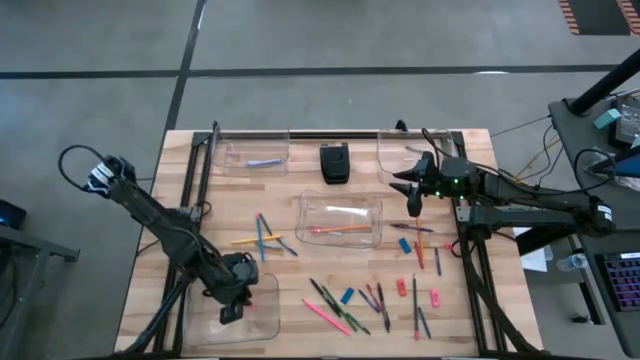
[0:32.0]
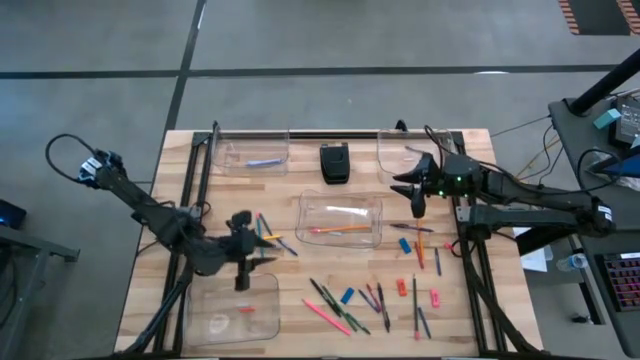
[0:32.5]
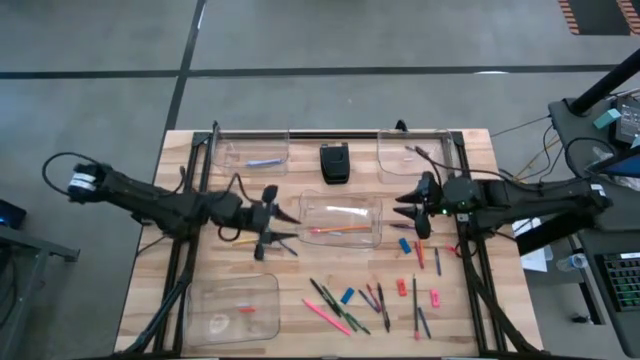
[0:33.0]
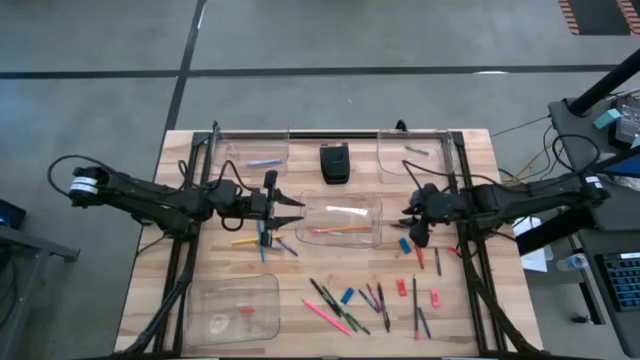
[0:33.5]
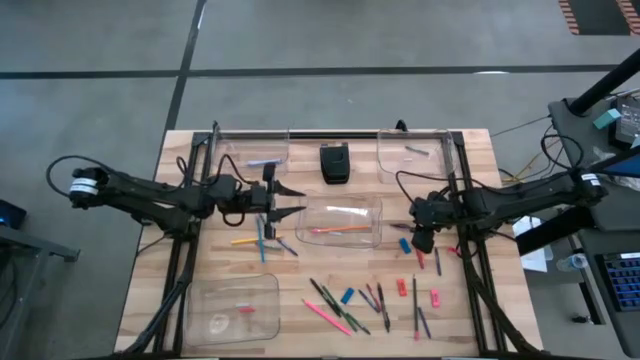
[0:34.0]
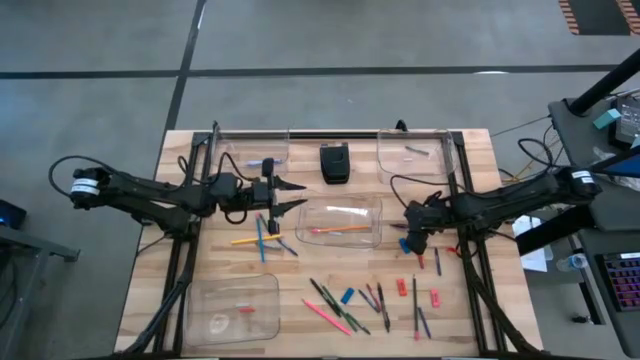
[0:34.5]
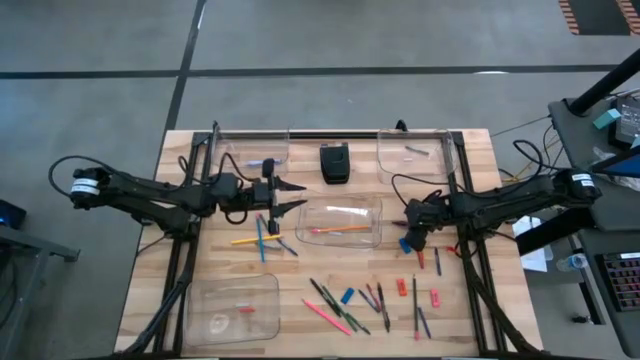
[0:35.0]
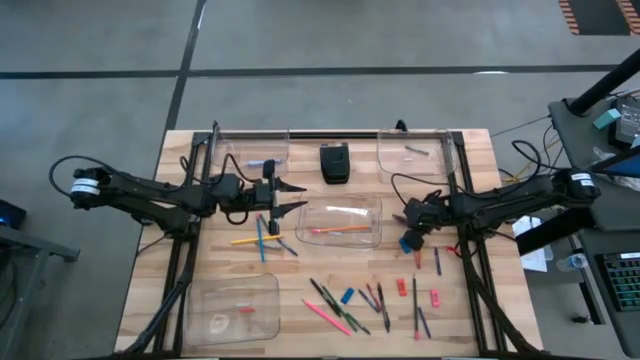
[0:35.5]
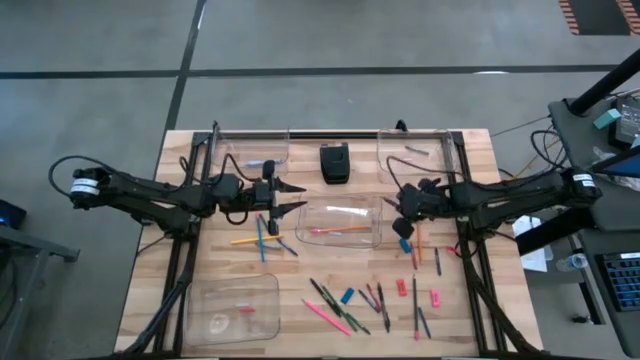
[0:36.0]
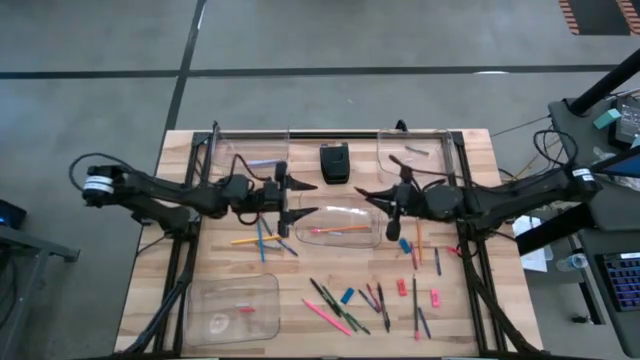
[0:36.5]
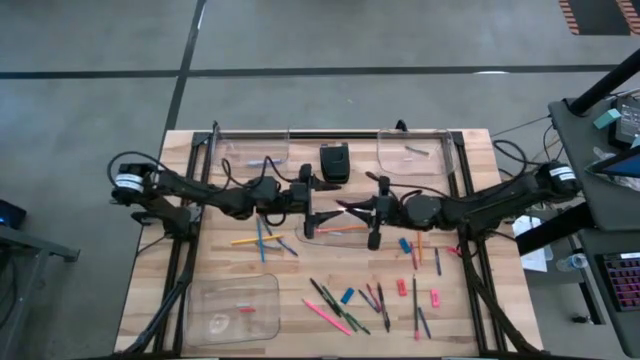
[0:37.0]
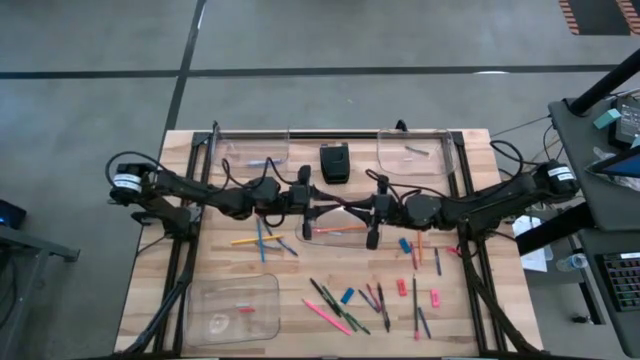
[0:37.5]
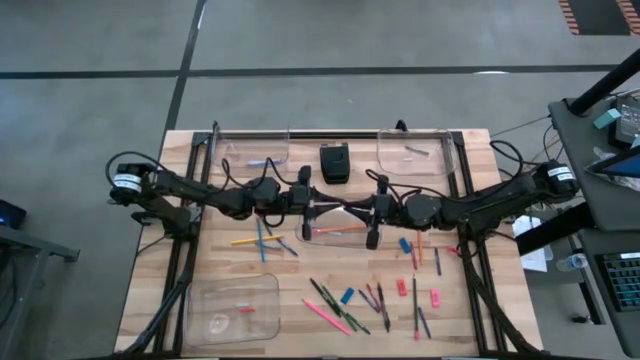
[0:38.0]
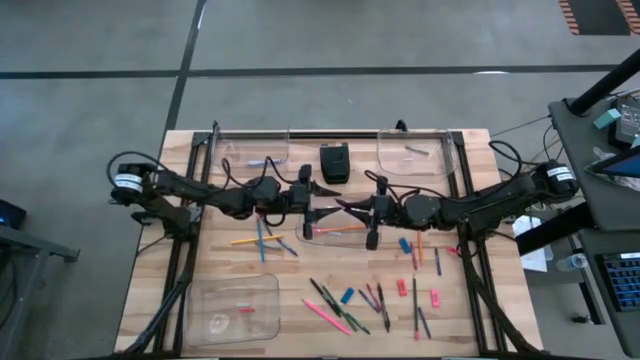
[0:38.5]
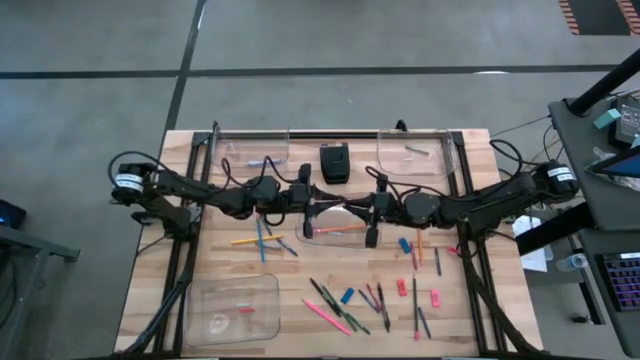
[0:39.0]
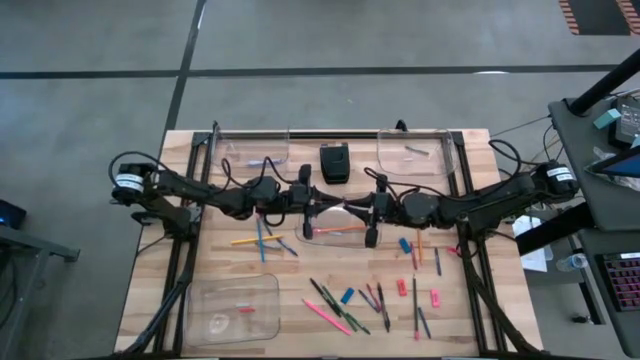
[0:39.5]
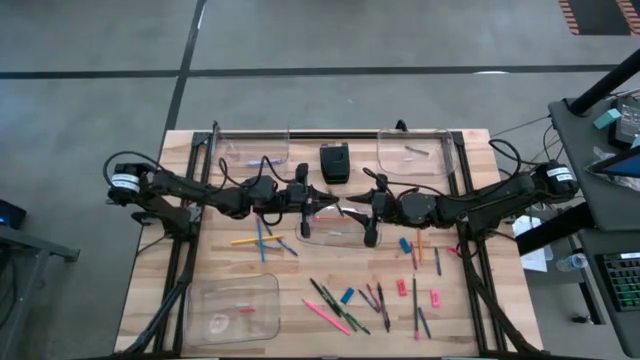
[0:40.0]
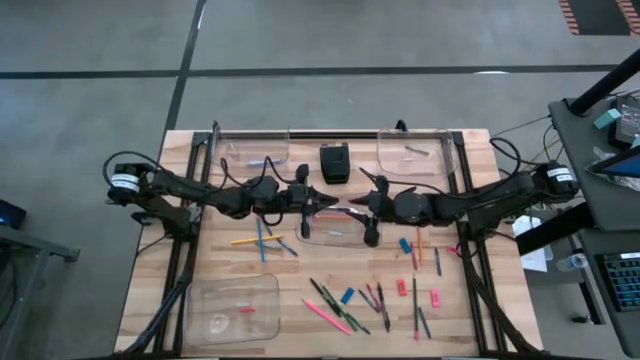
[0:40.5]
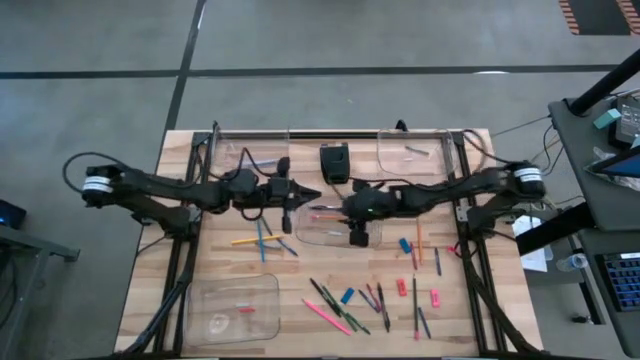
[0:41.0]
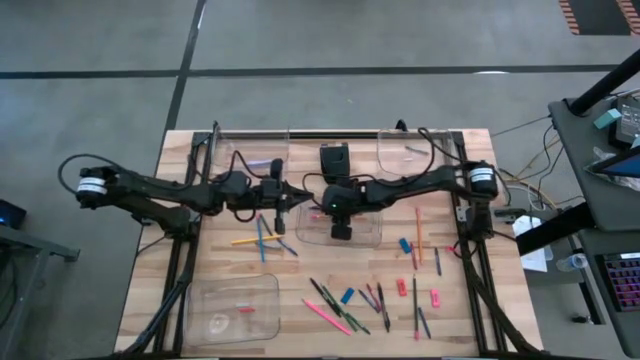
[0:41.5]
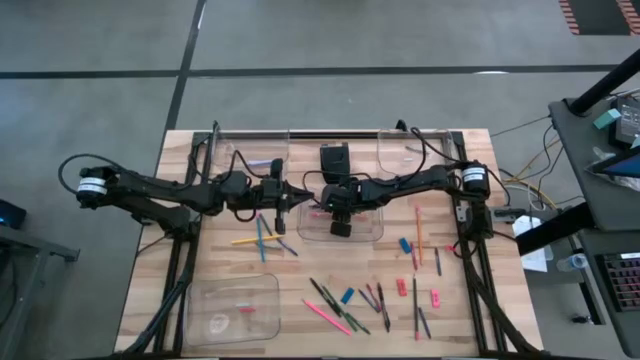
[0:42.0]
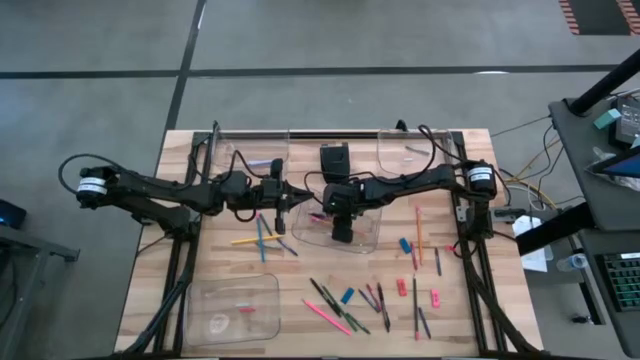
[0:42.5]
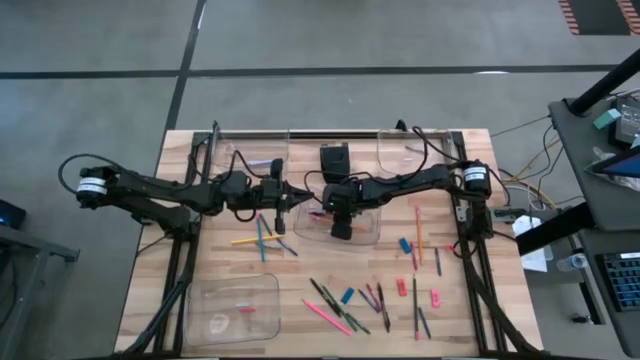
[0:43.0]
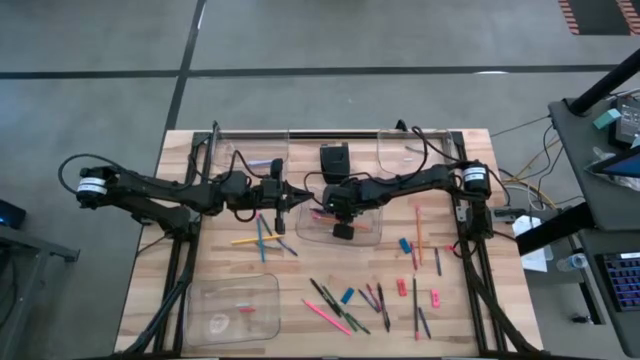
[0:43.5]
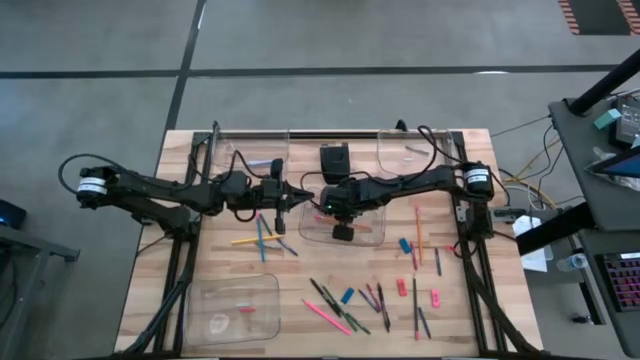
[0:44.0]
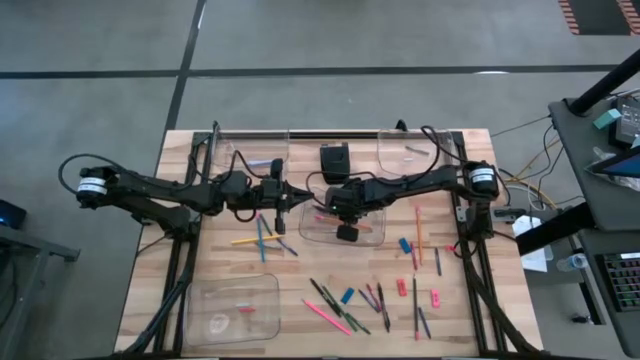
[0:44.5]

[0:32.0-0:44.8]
Task: Sort crayons/erasers/pens/pencils in bins
Put the violet pen into the top left transparent bin

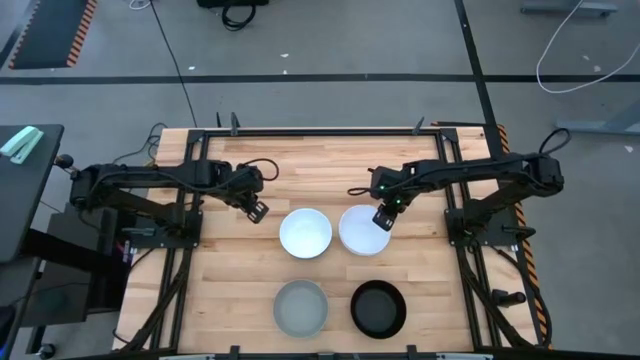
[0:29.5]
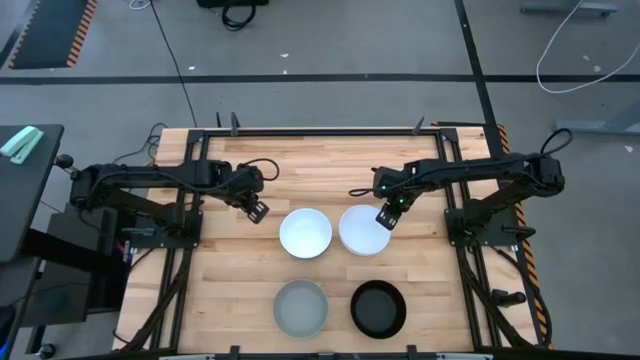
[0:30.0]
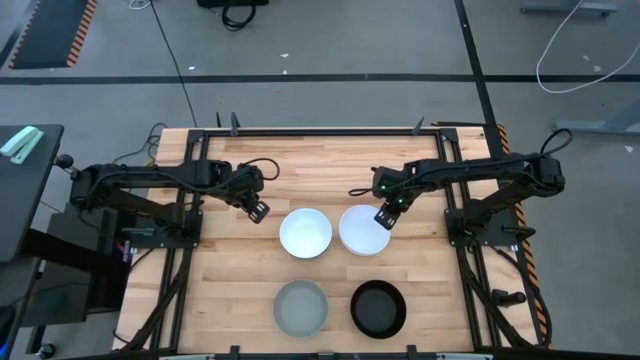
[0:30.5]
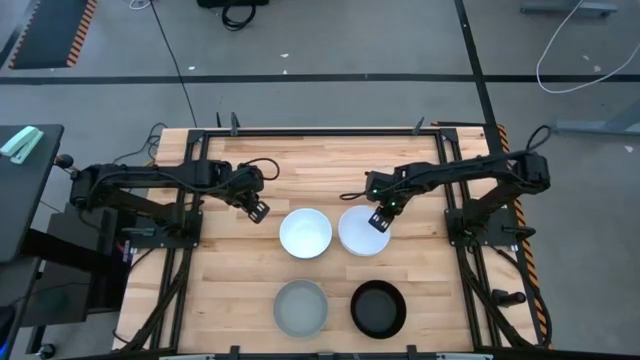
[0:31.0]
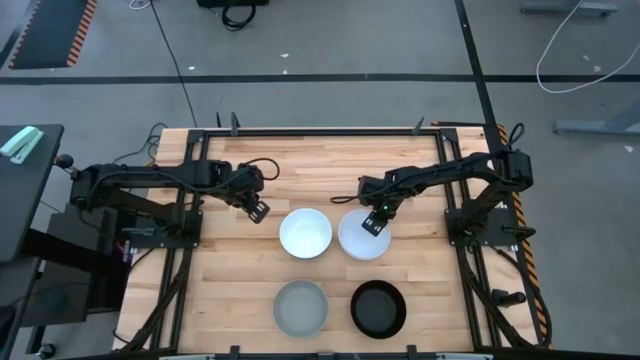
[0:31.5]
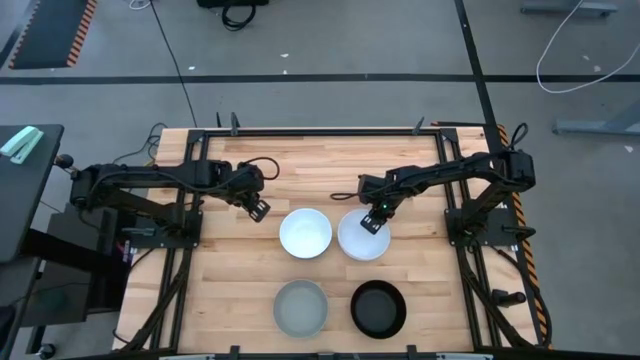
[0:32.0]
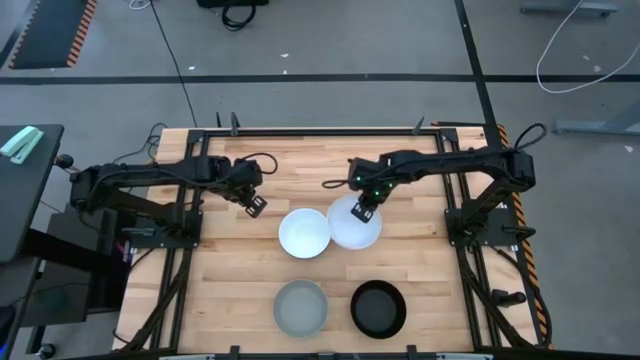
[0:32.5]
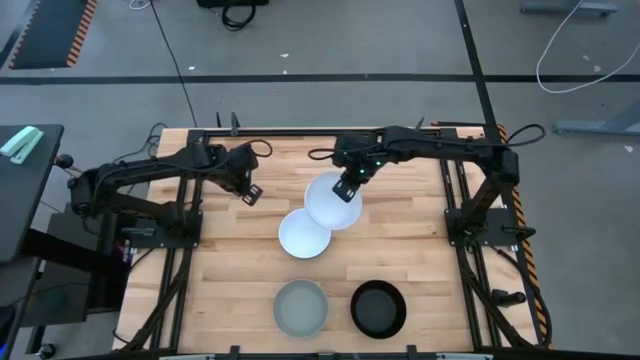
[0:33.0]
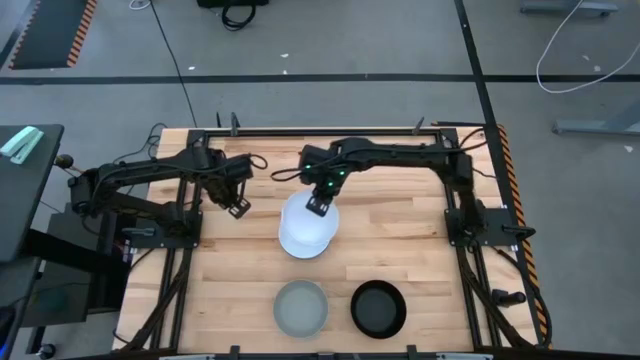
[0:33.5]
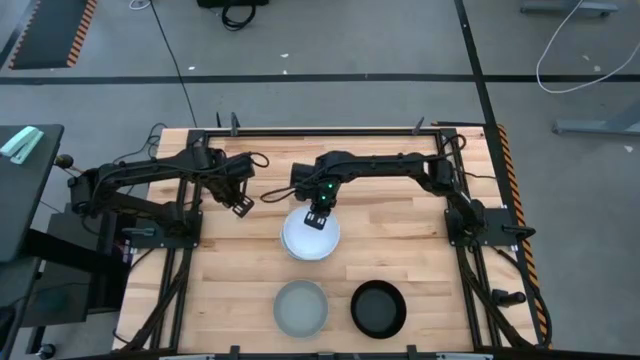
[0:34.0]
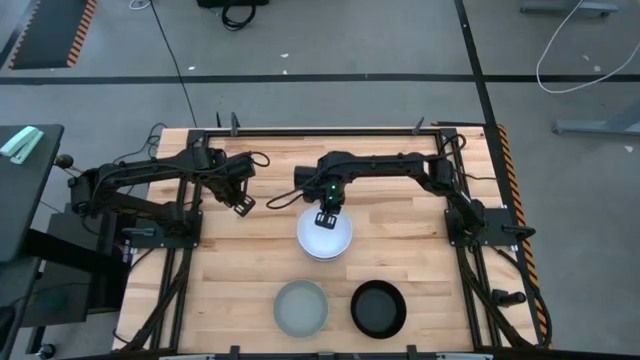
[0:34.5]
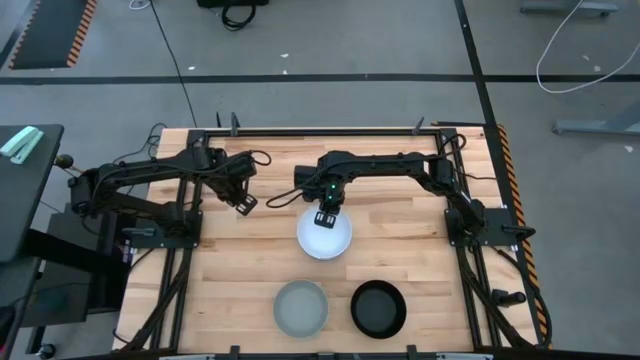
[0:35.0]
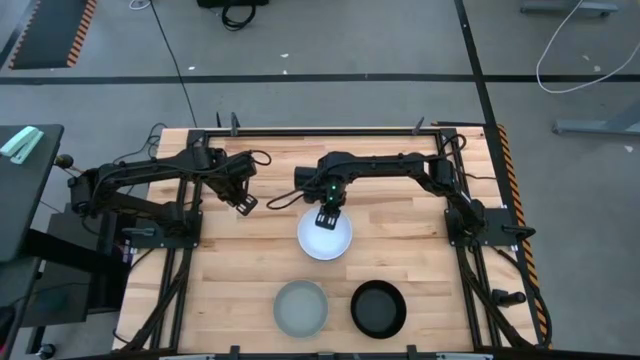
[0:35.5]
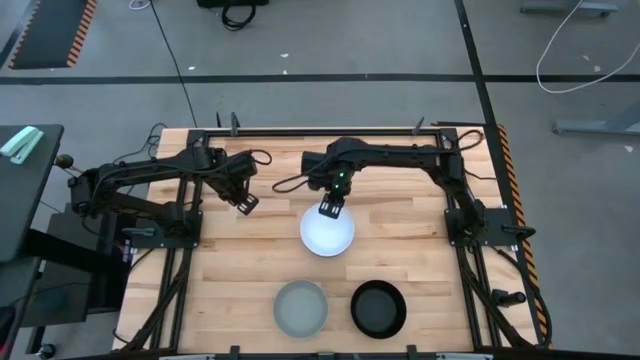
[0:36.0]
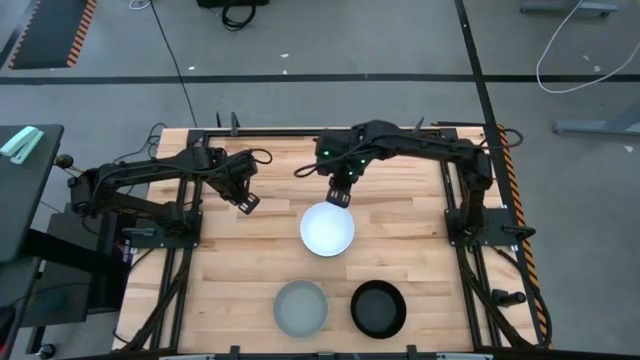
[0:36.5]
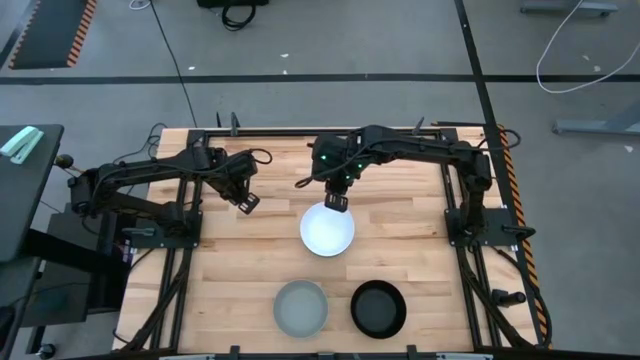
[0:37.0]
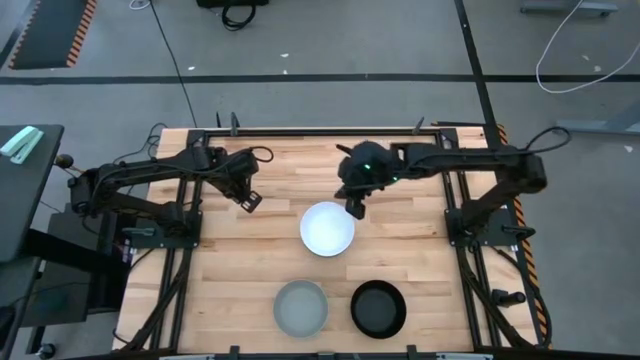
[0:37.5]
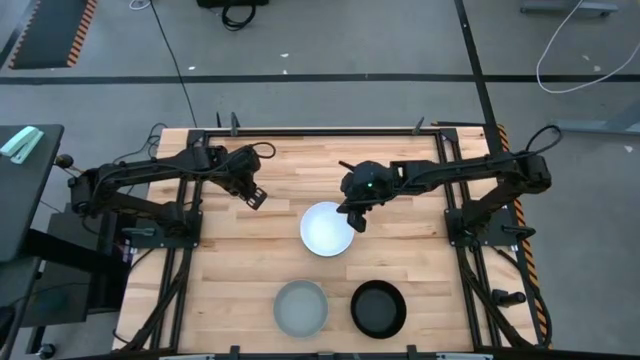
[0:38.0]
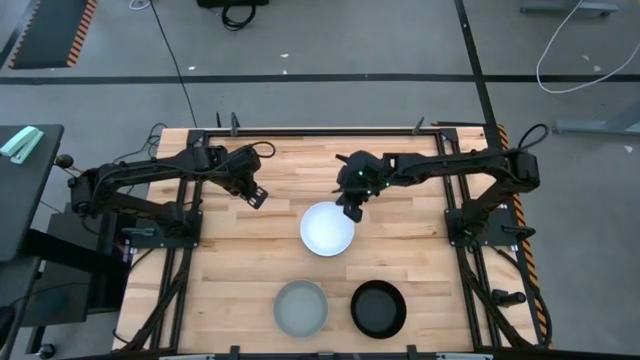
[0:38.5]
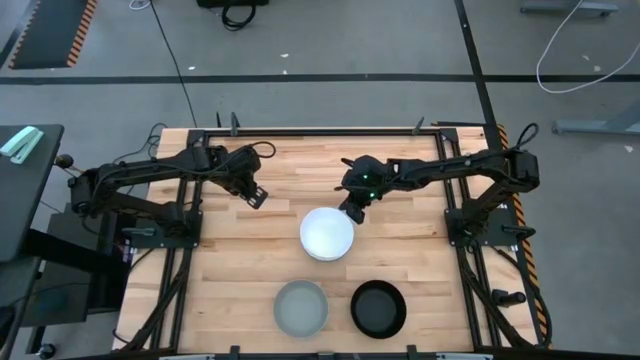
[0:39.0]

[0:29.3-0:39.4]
Task: Nest bowls inside each other
Stack the right white bowl on the left white bowl
